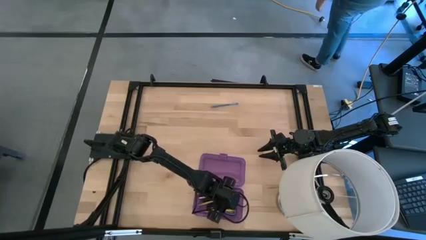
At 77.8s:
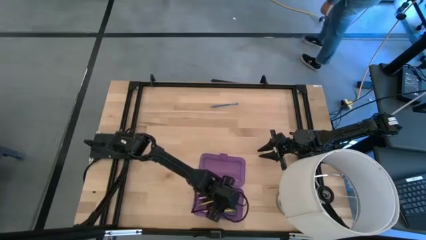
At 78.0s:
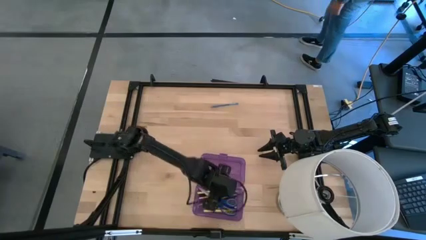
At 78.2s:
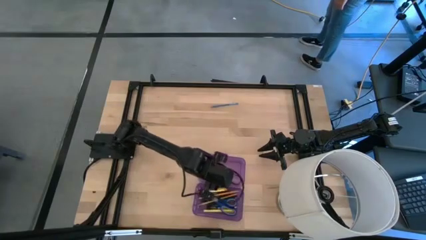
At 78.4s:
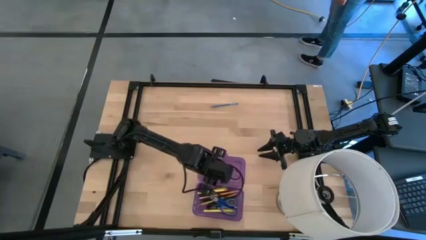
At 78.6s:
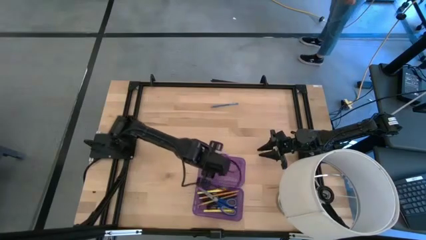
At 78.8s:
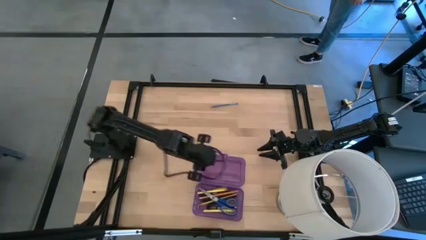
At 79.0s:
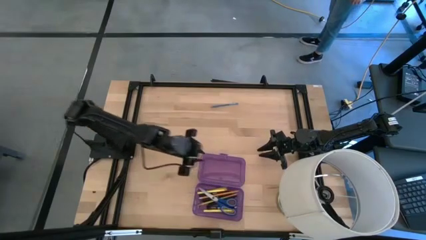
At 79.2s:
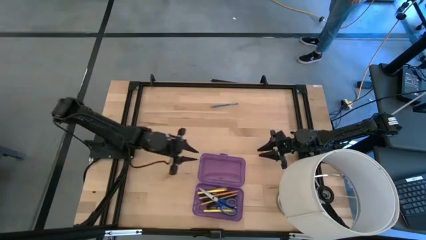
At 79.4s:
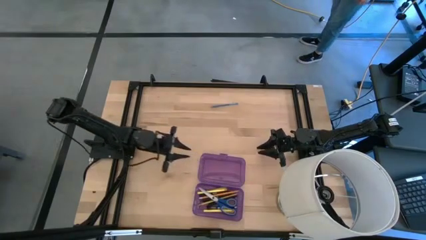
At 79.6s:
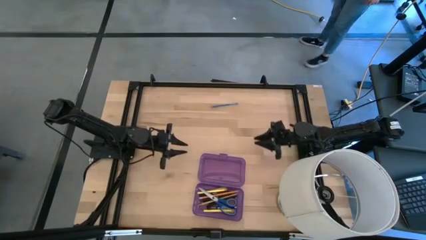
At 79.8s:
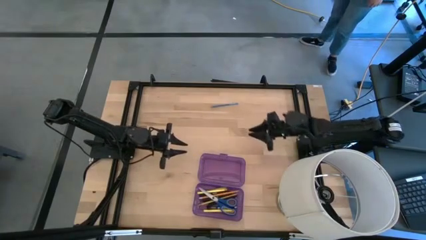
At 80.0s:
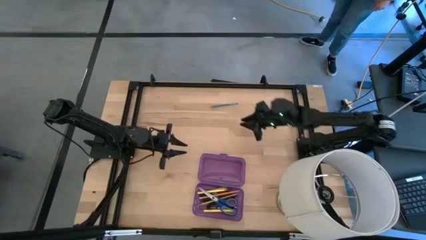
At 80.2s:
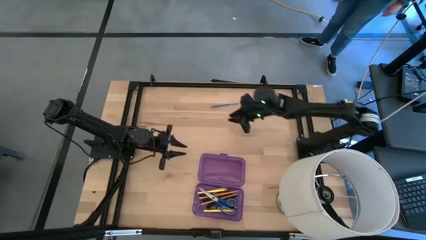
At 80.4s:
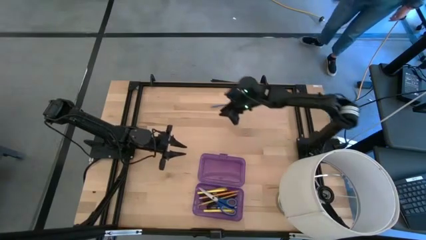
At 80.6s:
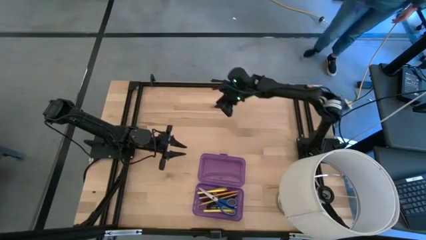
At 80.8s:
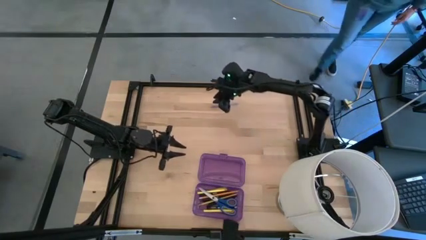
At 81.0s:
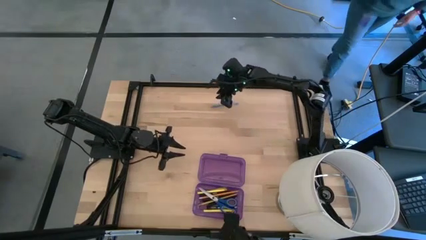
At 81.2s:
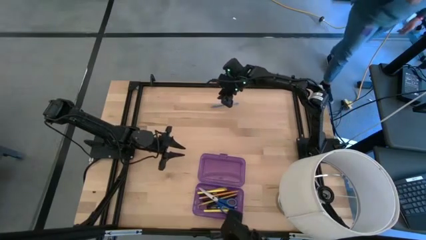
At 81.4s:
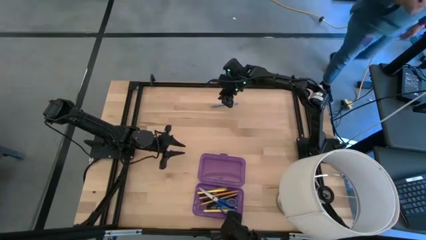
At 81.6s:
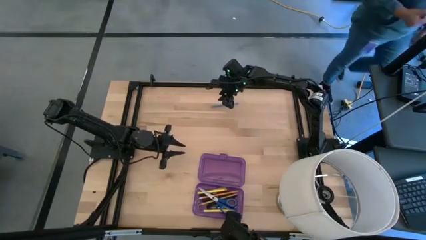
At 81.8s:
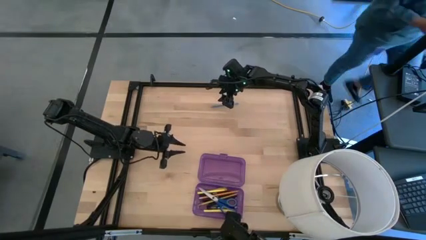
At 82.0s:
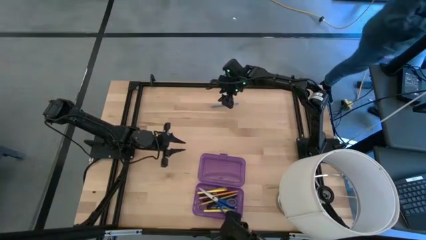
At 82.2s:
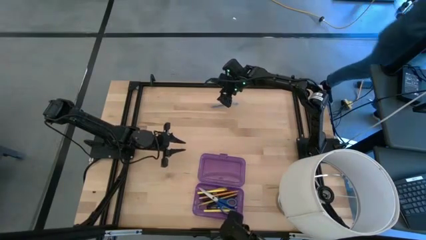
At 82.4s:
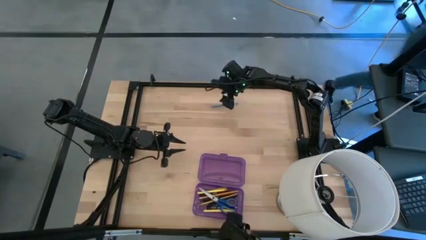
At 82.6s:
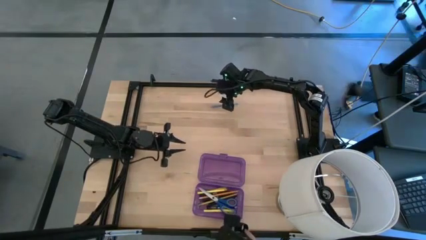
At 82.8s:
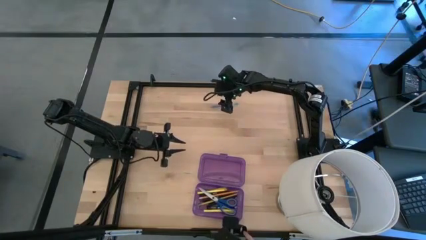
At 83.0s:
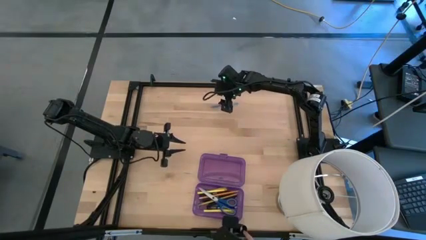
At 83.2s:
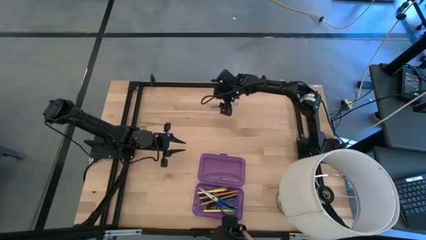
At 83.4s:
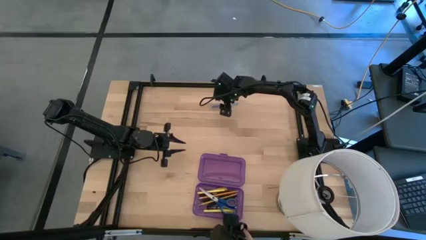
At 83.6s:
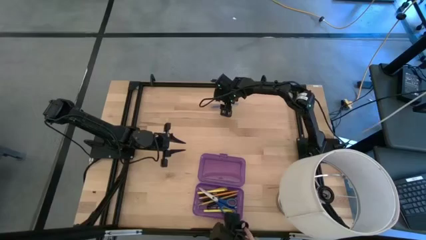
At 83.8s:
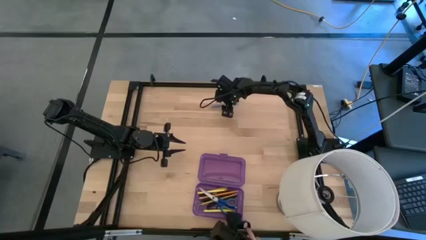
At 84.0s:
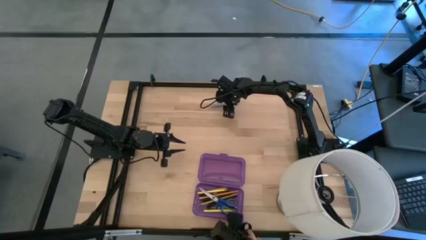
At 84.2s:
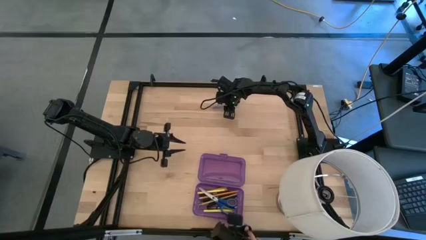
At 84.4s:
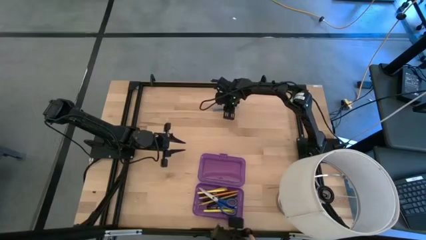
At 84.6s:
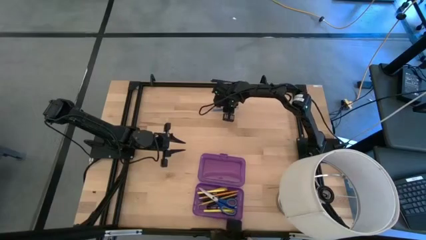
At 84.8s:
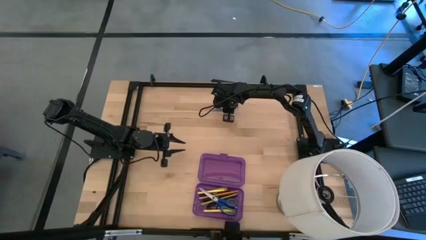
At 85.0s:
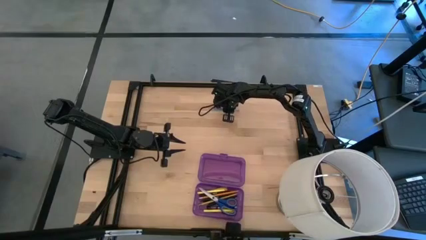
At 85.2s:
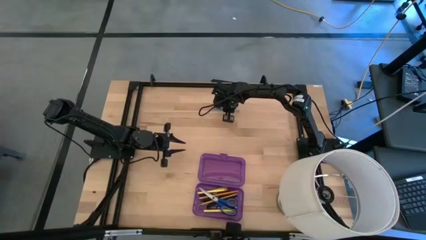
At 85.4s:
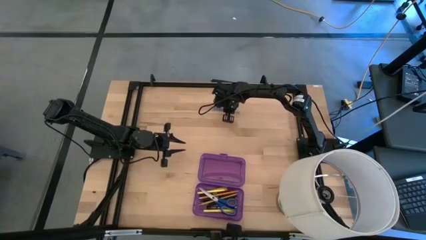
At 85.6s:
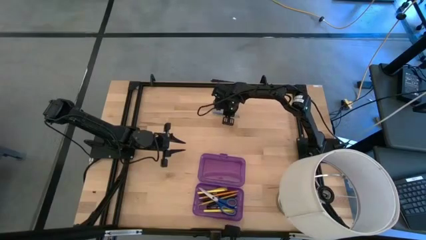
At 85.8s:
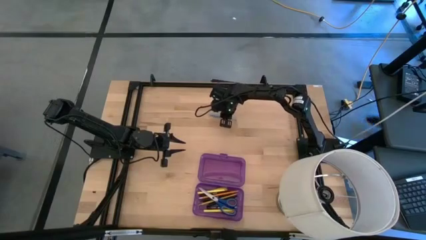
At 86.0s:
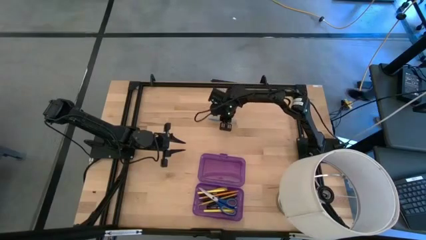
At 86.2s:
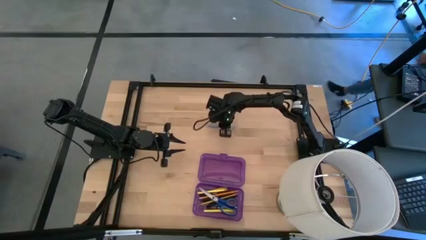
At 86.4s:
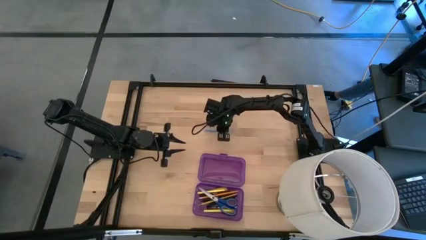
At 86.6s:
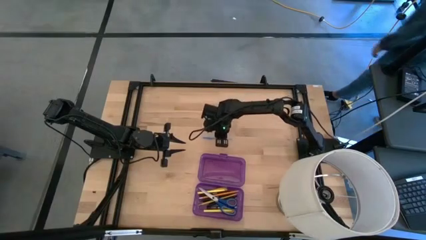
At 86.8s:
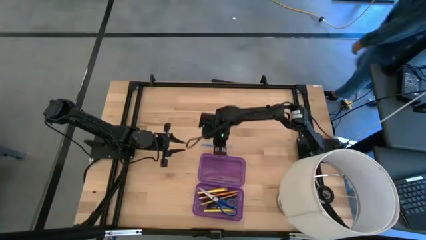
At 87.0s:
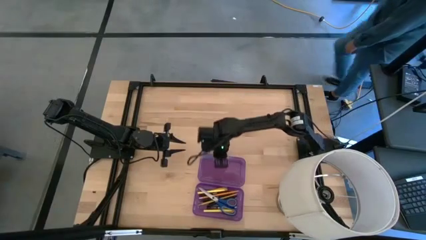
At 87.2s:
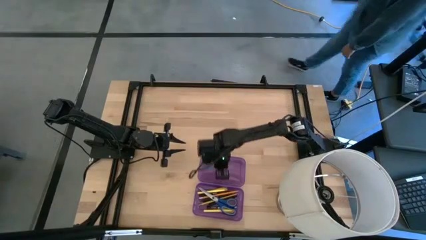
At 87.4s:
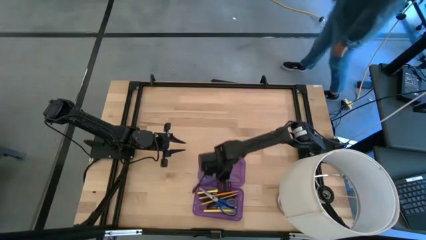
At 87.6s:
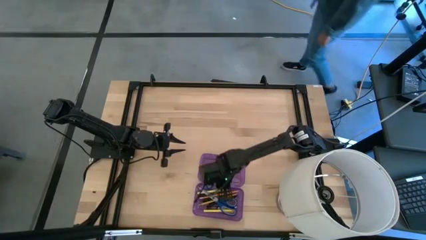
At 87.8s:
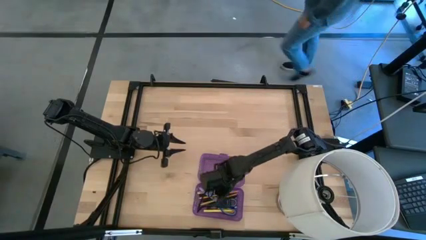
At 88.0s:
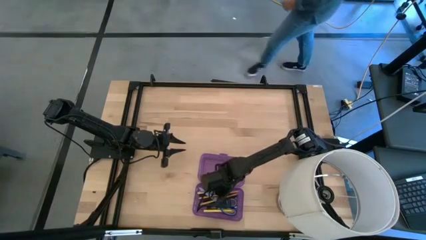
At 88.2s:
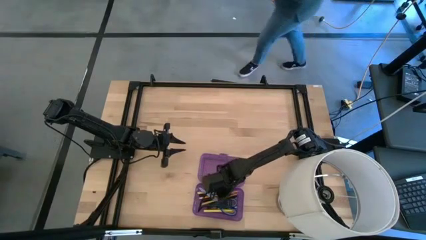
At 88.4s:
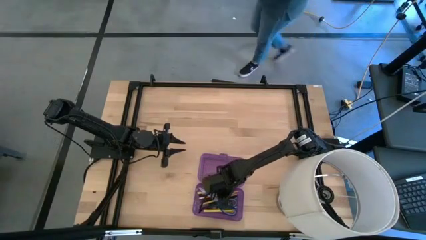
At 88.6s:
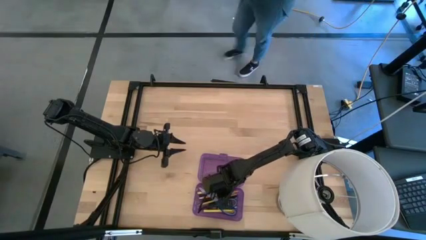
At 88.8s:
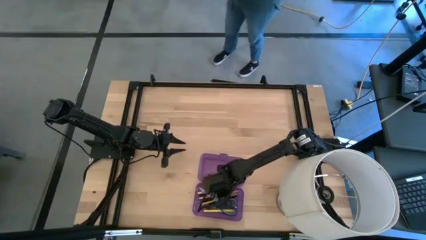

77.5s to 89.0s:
Task: Pick & place school supplies into a supply box
Put the blue pen into the violet supply box

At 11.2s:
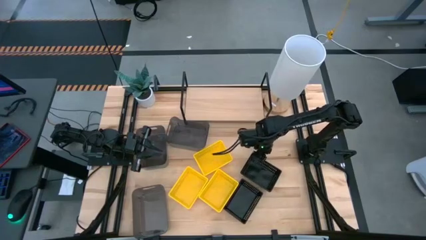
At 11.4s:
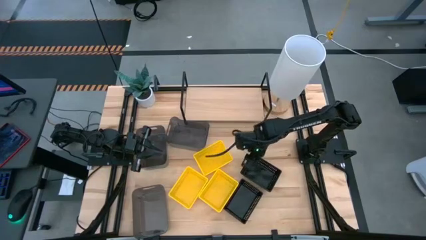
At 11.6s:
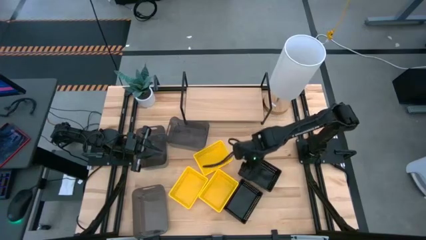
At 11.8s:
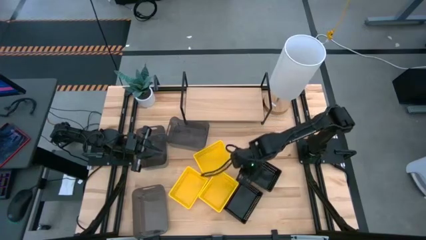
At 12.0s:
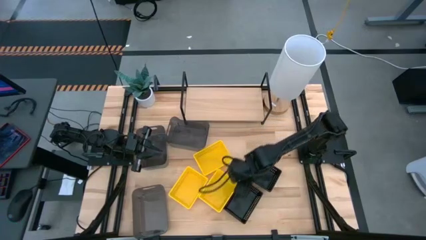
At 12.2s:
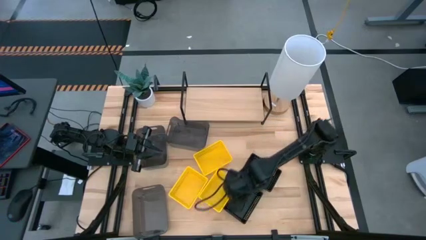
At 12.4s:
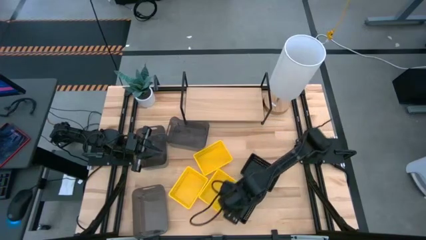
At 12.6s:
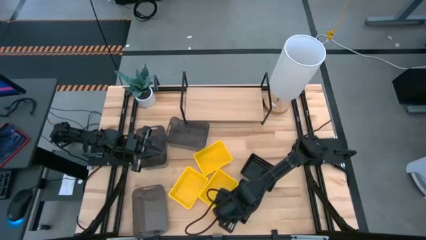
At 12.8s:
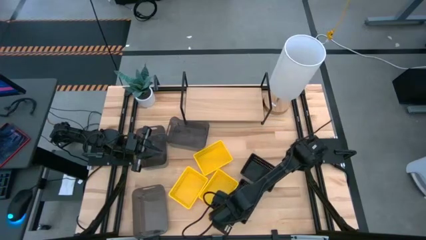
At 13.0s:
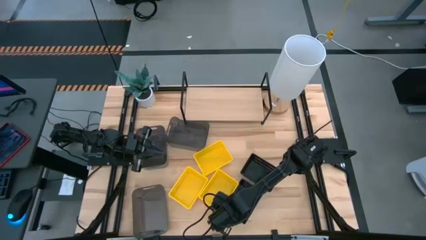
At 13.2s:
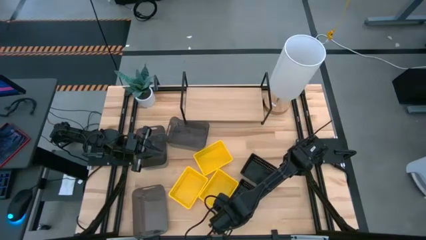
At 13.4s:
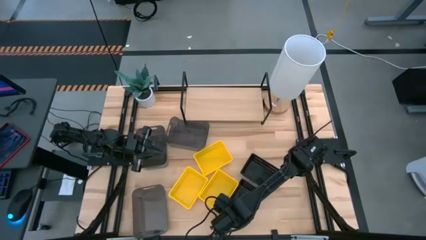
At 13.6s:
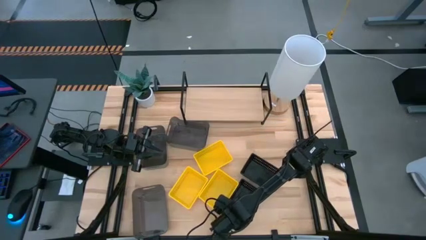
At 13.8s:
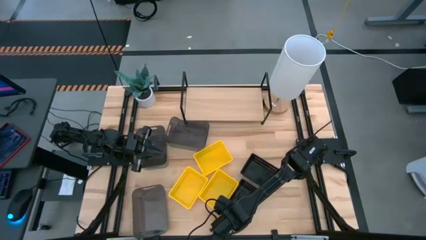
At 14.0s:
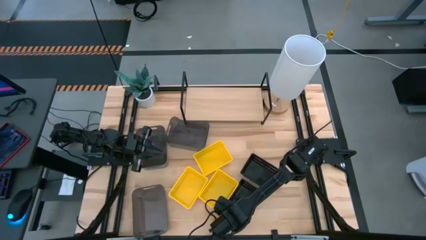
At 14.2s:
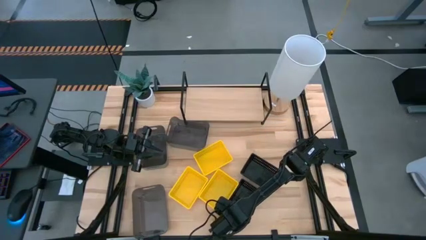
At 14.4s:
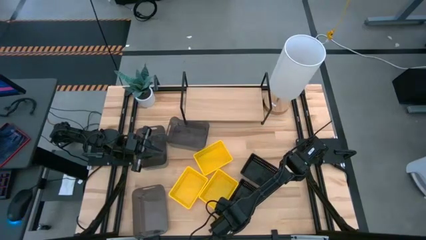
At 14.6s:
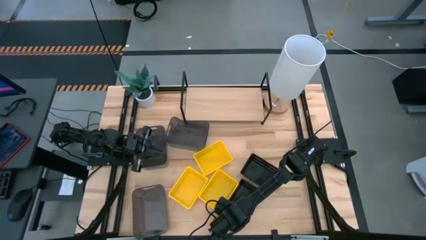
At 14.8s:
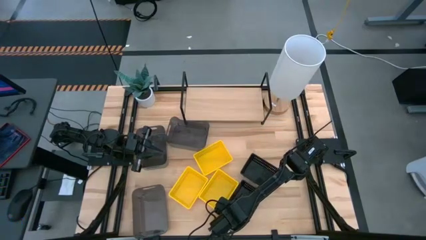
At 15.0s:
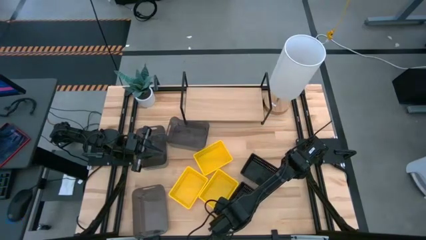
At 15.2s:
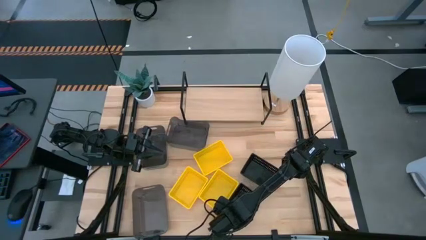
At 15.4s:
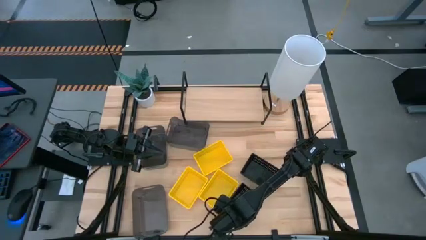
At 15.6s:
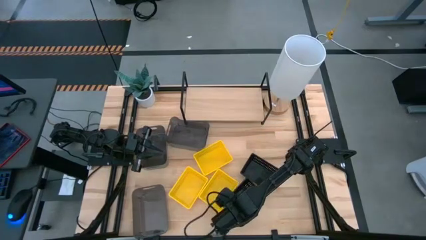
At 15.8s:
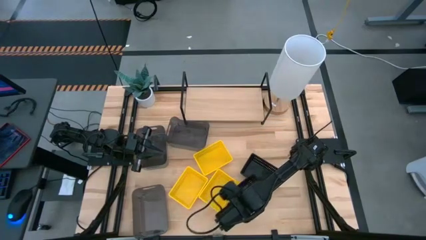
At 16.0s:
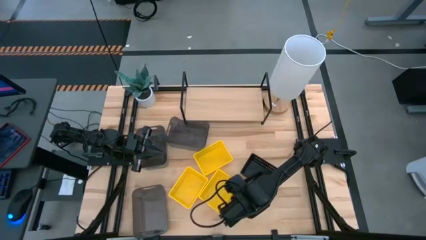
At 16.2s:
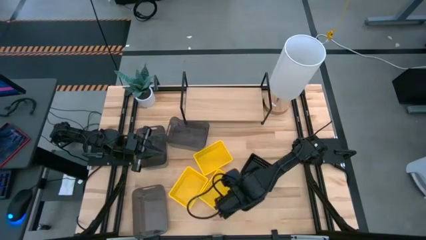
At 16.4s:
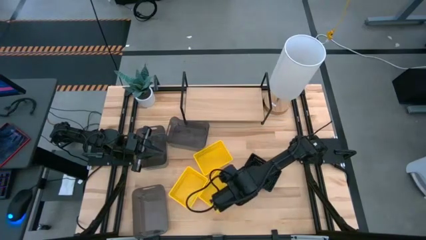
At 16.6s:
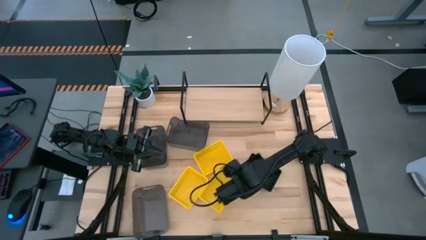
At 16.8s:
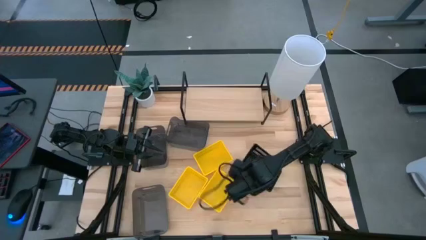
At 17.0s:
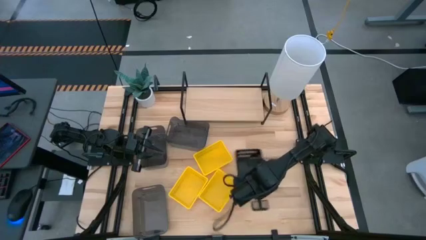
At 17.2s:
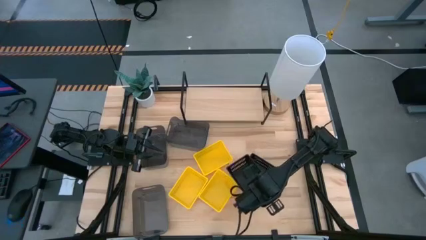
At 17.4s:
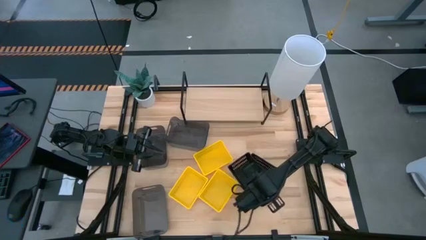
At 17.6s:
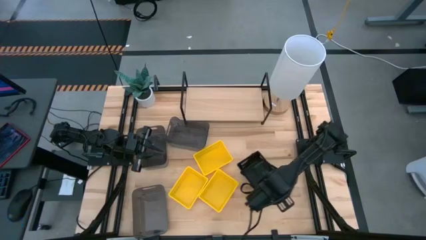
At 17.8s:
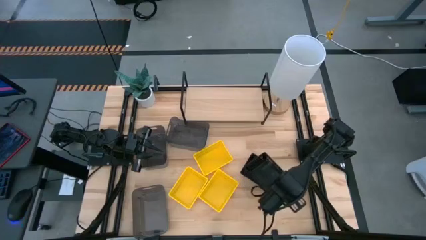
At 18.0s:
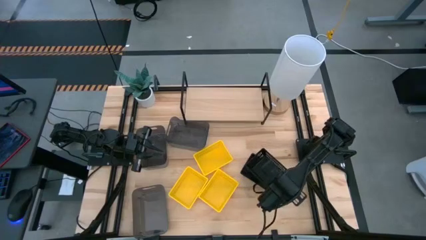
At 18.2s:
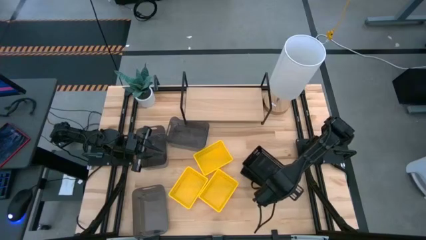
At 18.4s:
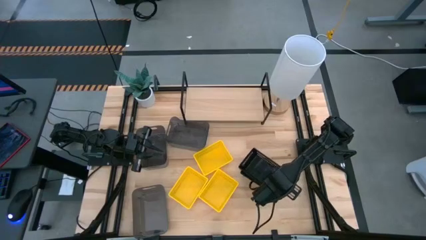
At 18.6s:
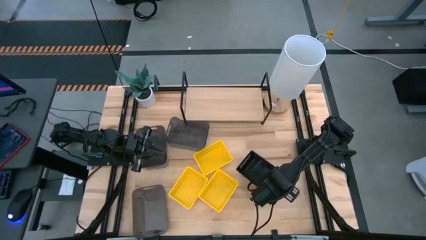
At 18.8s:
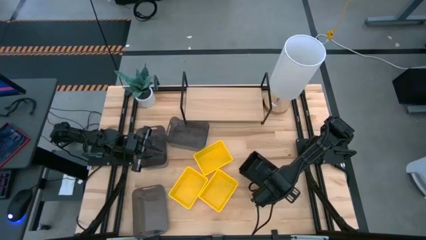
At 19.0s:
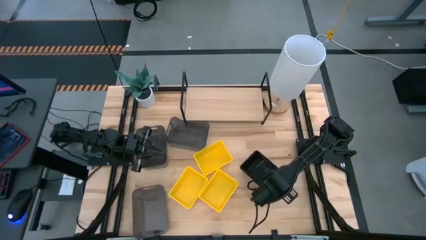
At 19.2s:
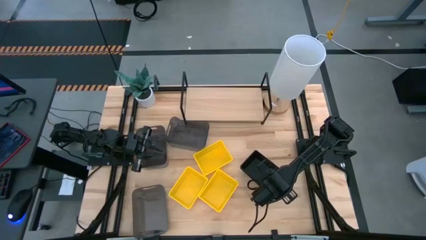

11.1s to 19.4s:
Task: Stack baskets on shelf by color
Stack the bottom black bin on the top black bin
